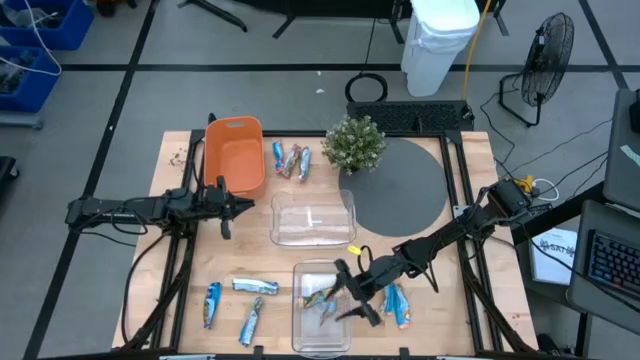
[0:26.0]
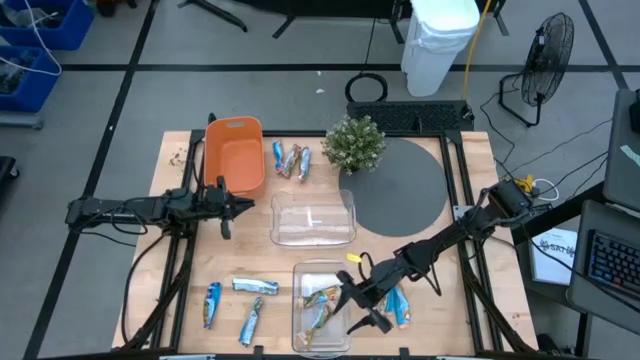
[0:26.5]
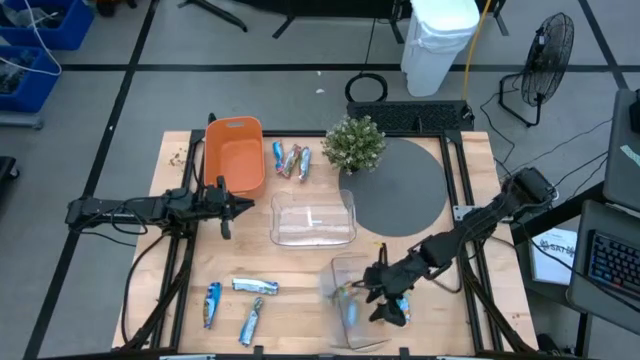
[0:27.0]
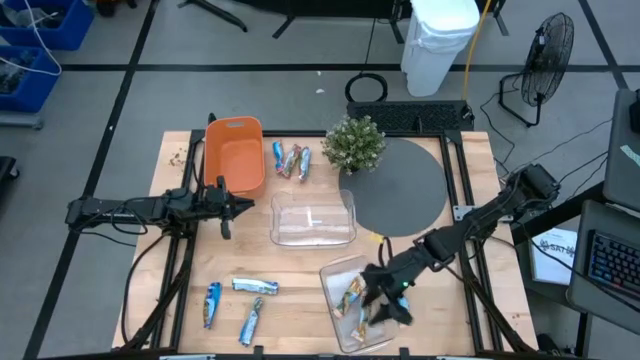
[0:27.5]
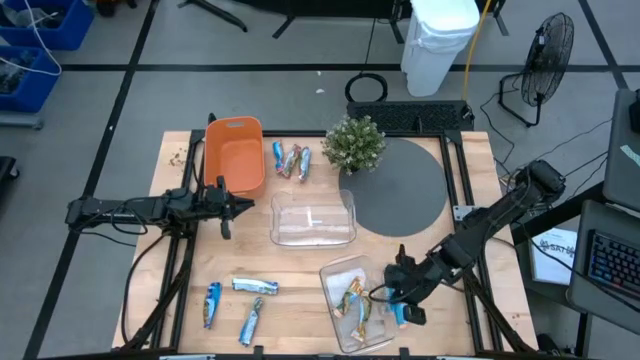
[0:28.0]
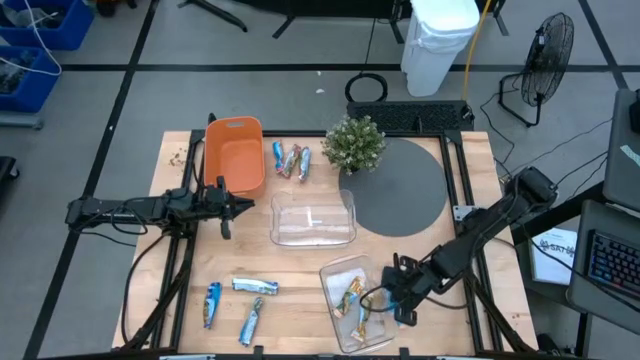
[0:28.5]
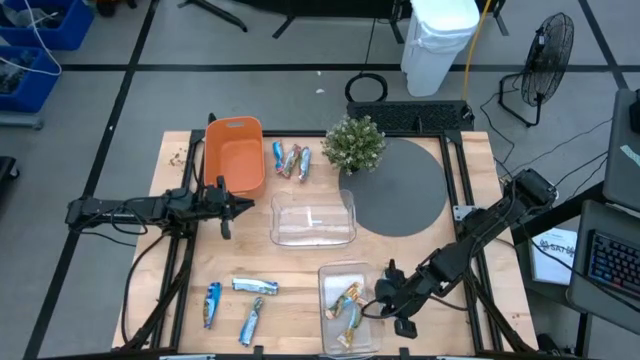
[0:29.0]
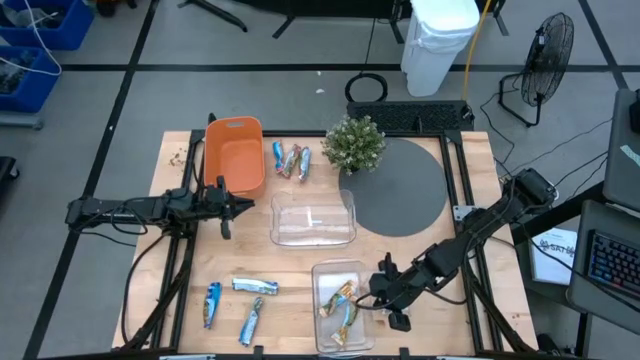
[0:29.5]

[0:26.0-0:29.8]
Task: Pick and place Granola Bars by type
Adjust the bottom transparent bin

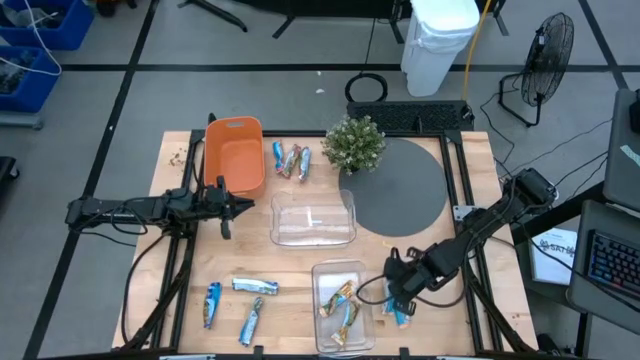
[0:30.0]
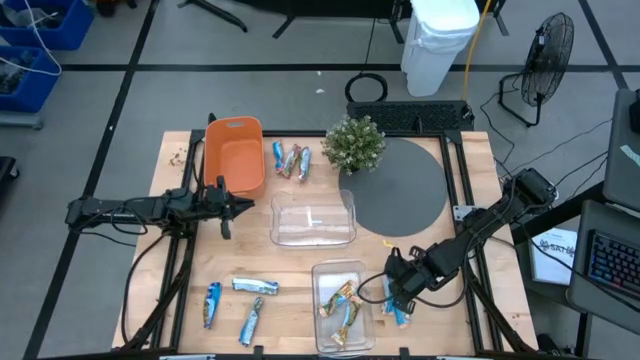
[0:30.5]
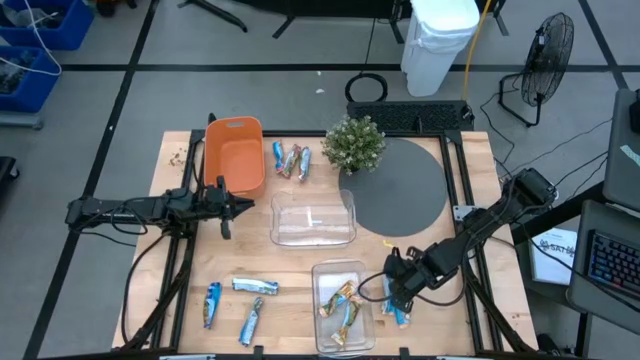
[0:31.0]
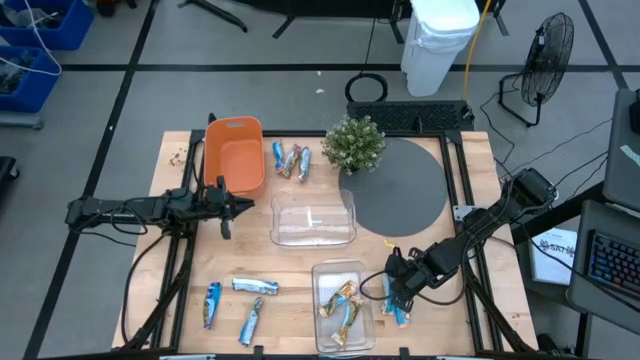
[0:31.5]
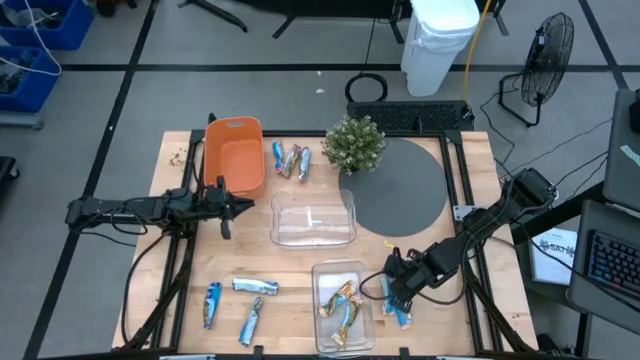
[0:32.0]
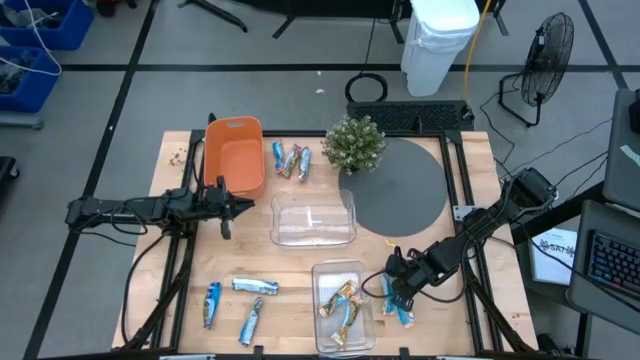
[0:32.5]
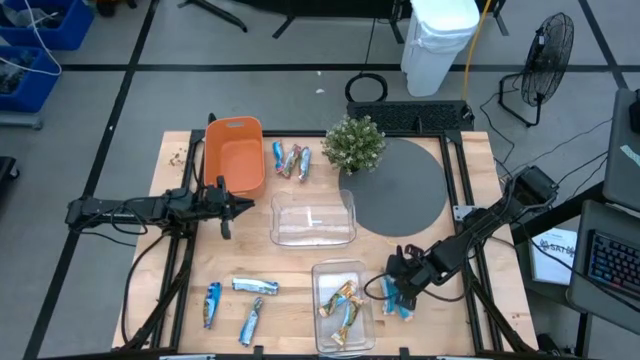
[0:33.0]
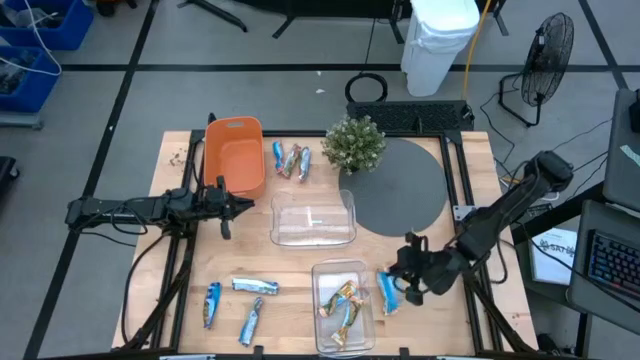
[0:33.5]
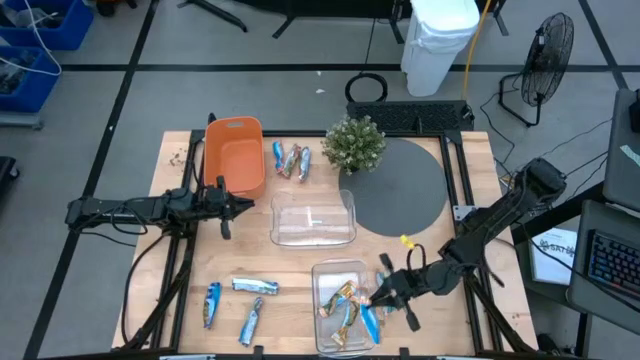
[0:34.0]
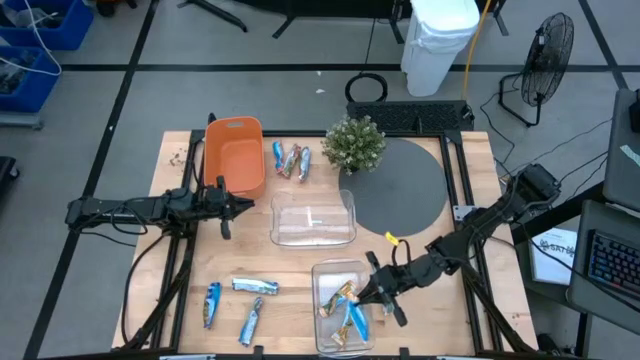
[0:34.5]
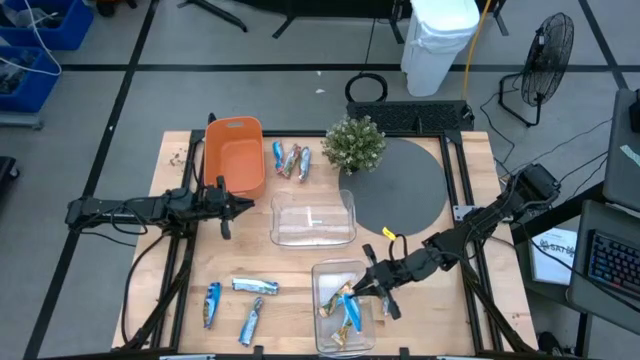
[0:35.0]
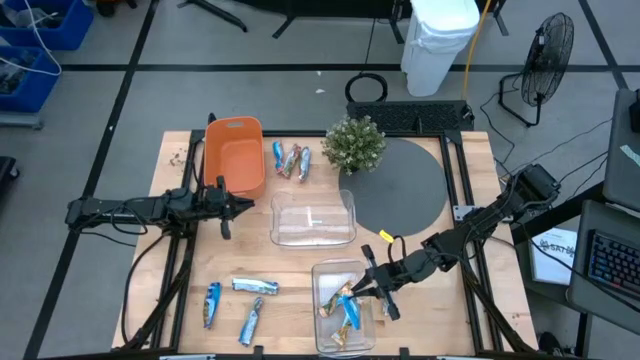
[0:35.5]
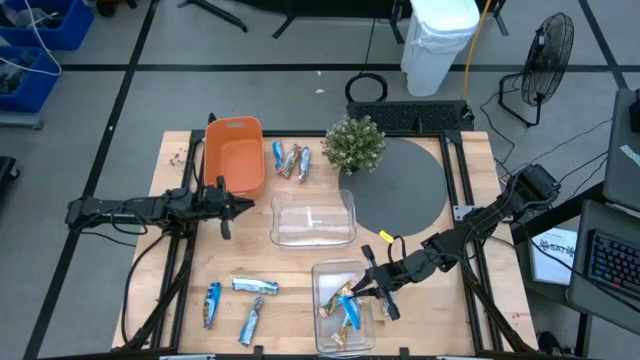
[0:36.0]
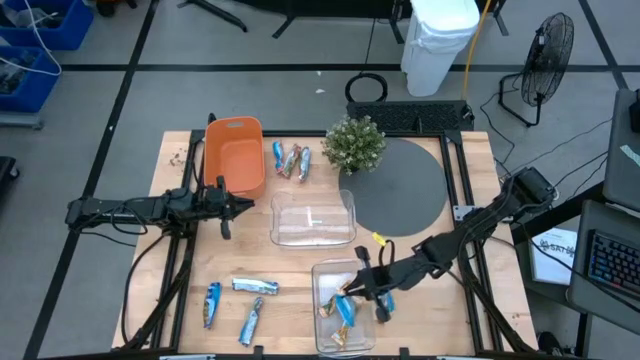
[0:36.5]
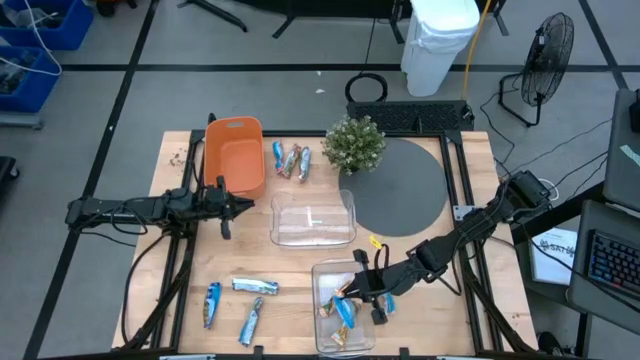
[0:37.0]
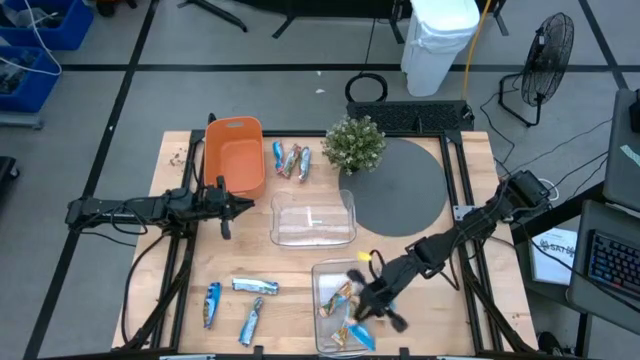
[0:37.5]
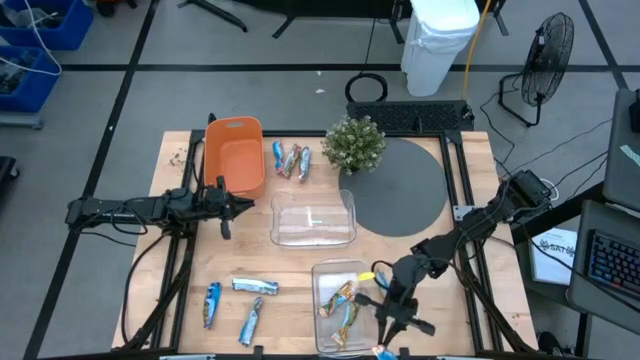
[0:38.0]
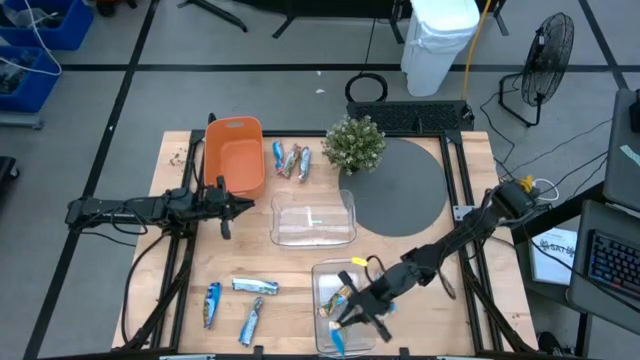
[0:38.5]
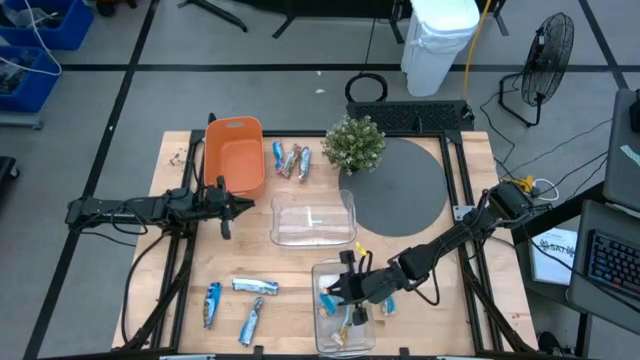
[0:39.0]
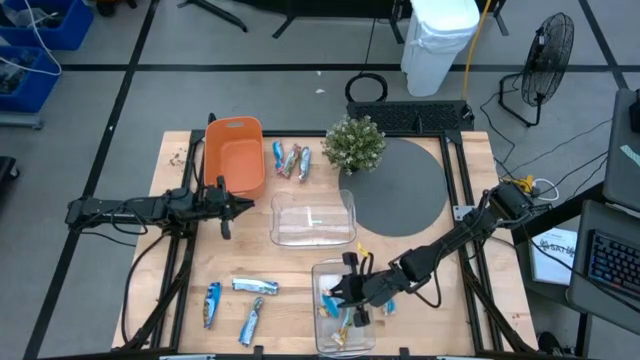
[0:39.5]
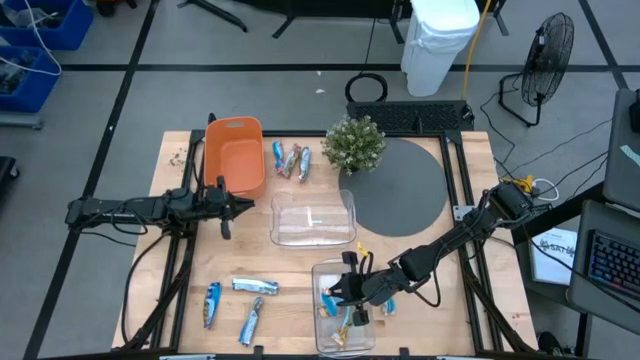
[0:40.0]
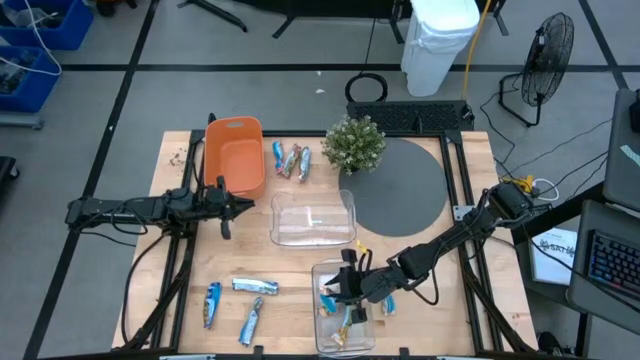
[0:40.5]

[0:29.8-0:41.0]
Put the yellow granola bar into the bottom transparent bin

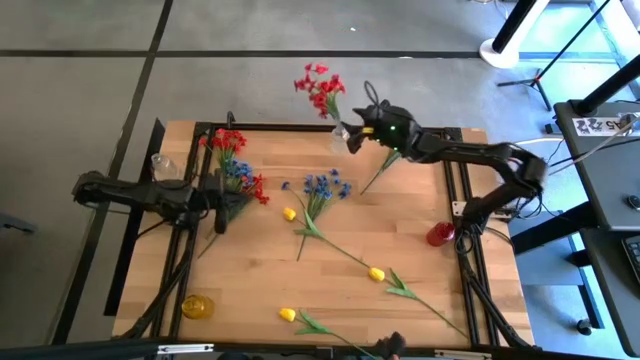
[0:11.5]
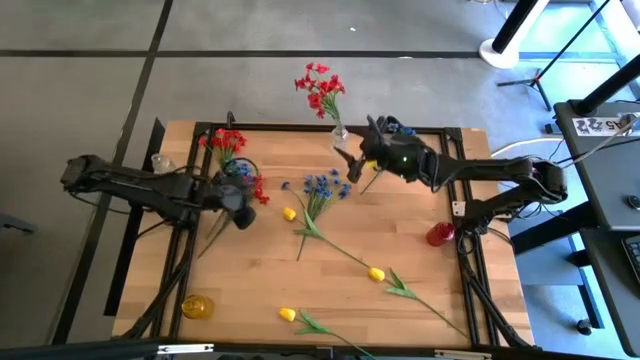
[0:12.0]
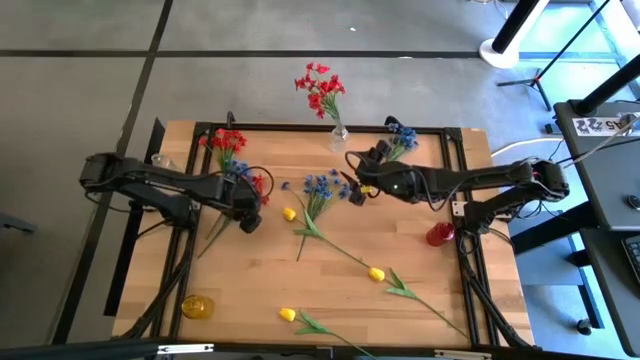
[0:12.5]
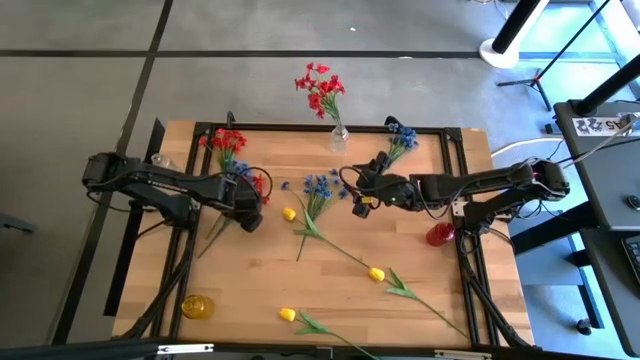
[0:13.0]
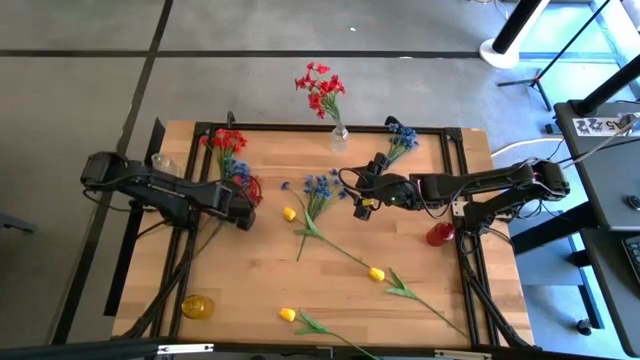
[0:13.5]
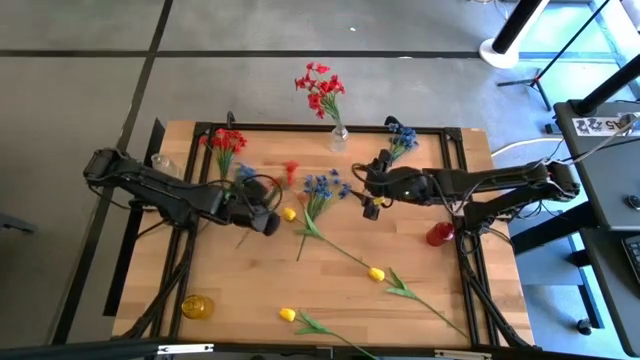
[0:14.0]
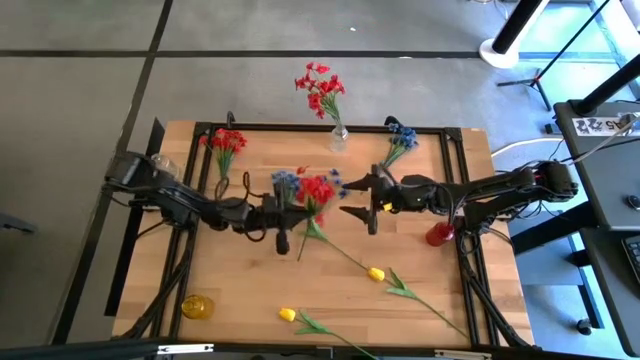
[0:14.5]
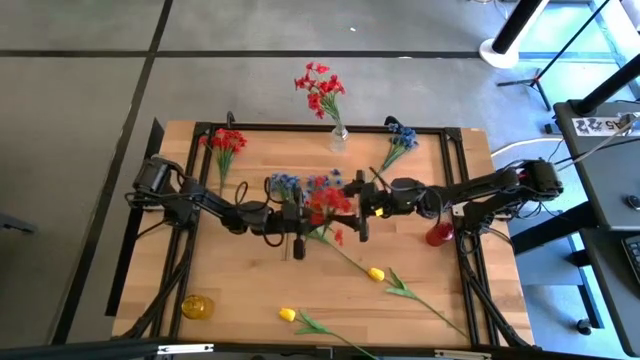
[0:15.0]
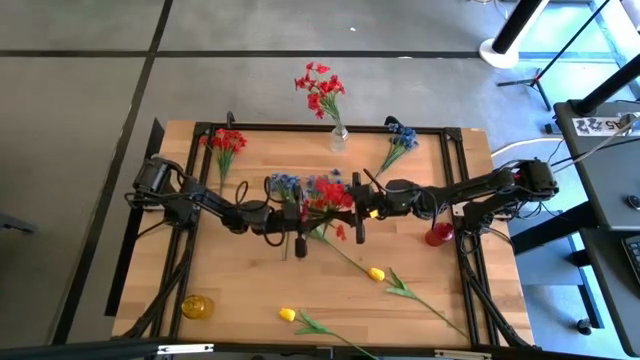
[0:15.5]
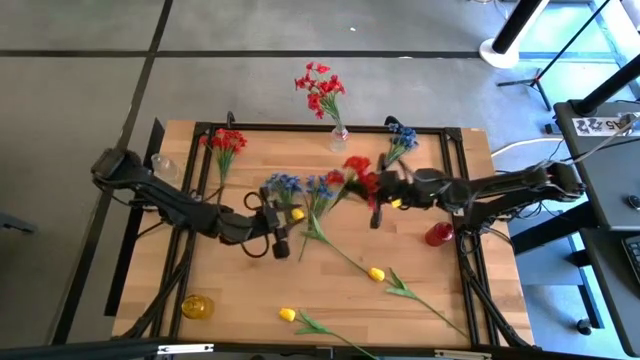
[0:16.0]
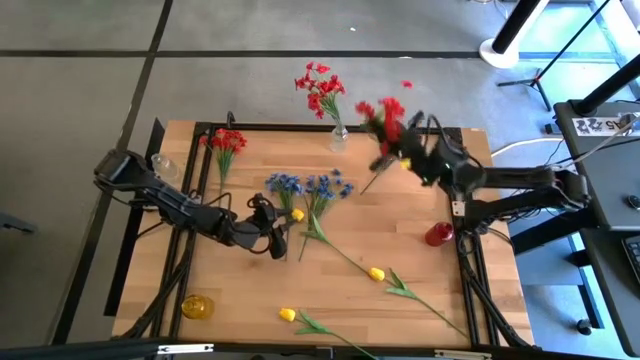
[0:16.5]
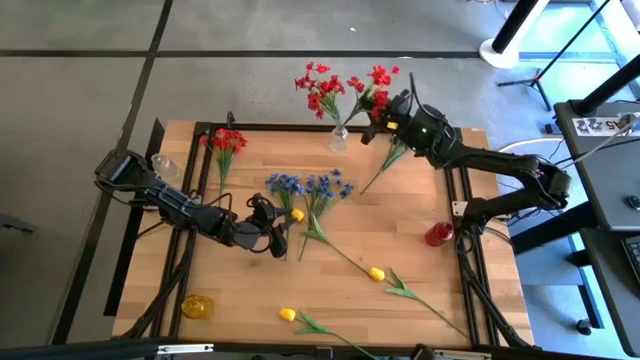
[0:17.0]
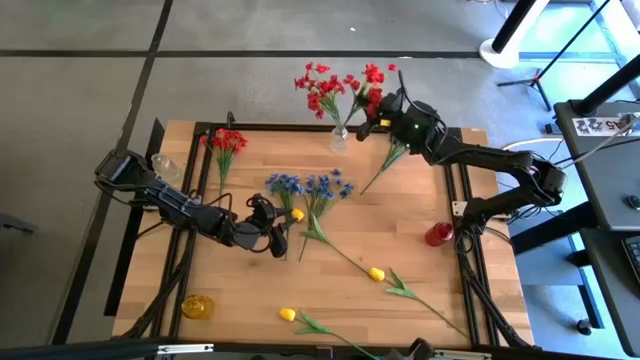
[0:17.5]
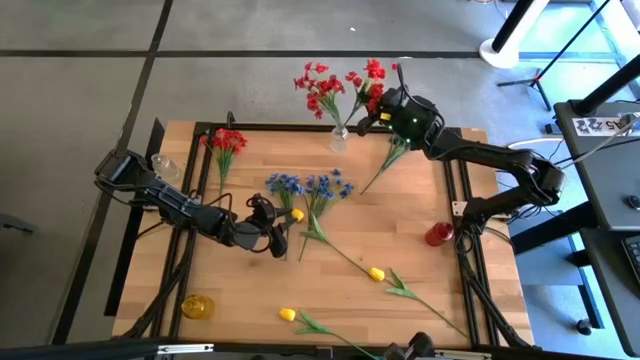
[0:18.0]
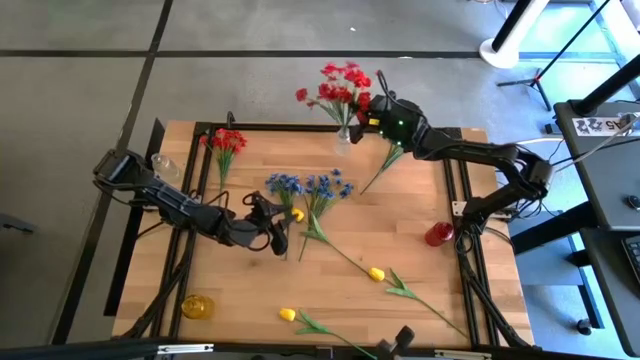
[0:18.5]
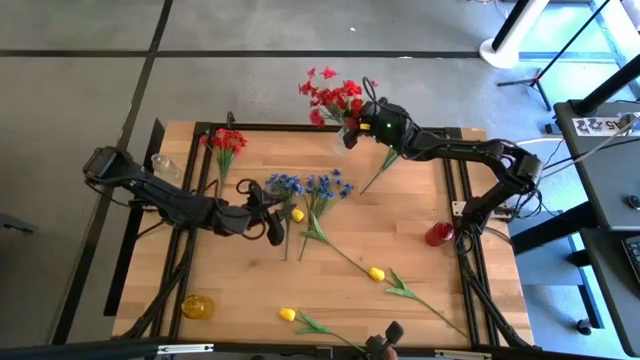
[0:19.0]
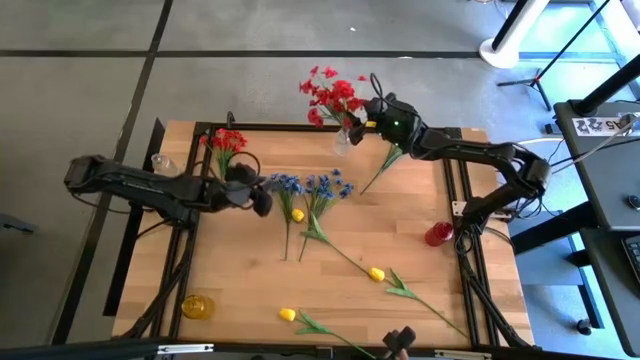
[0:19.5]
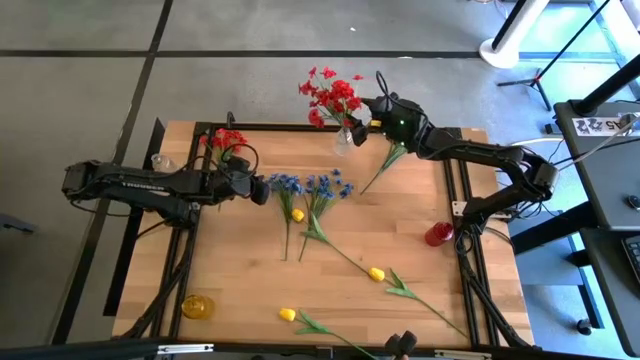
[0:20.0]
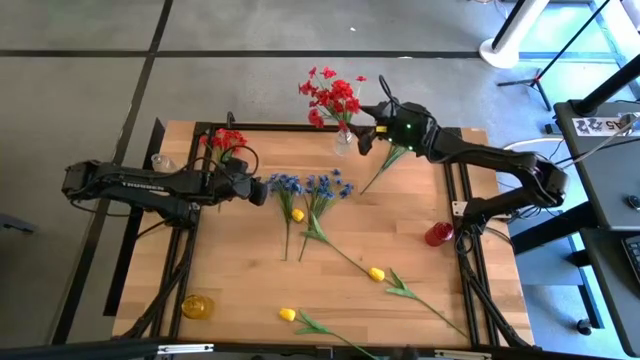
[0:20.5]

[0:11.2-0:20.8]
Task: Sort flowers into vase by color
Put the bottom red flower into the transparent vase
